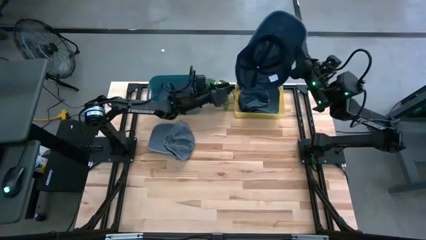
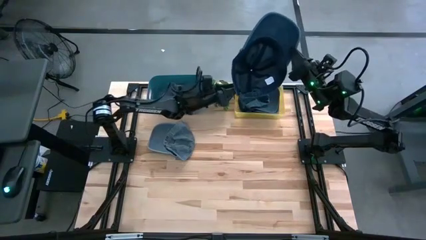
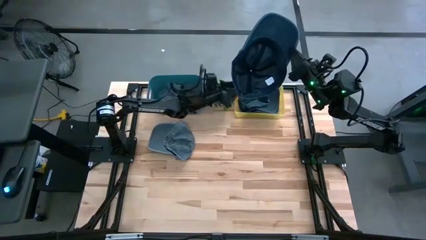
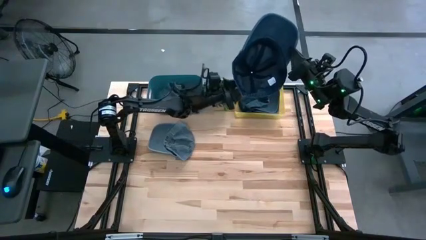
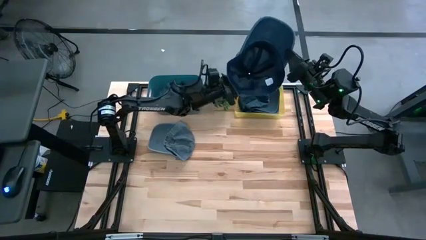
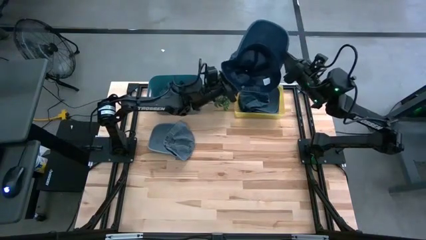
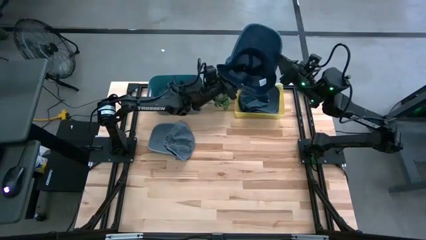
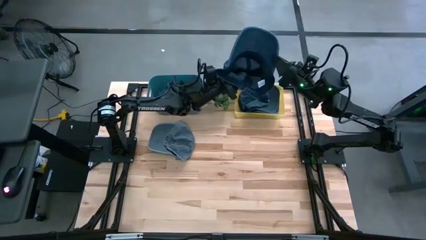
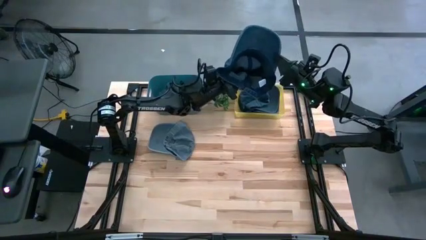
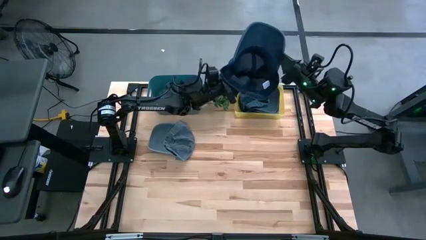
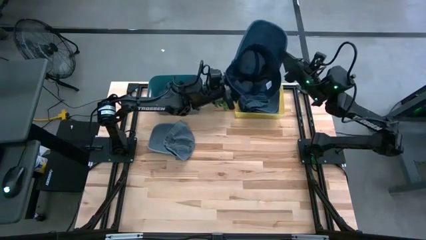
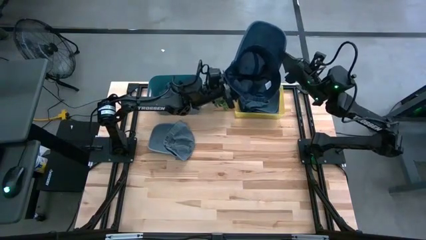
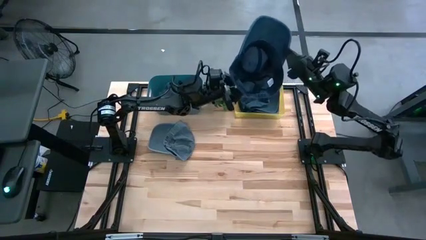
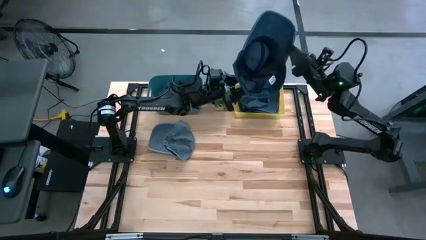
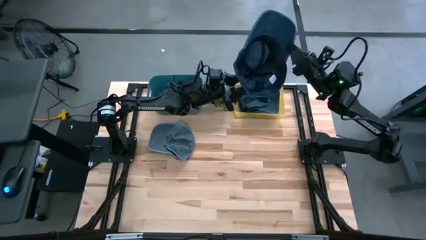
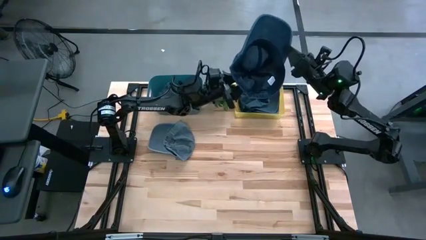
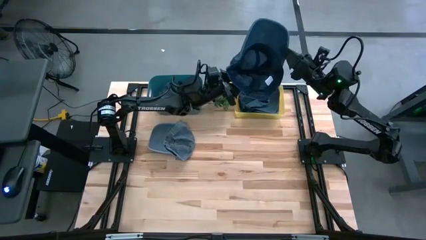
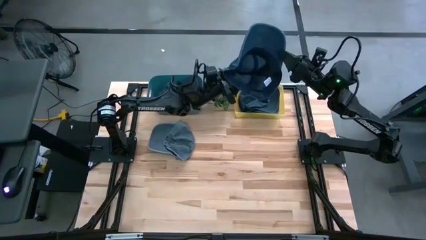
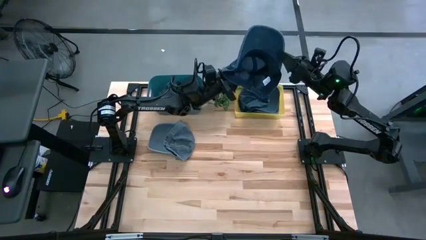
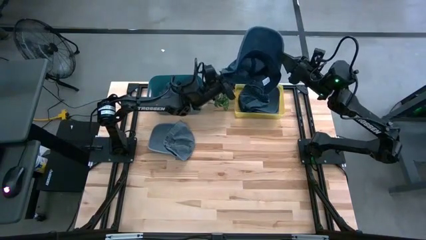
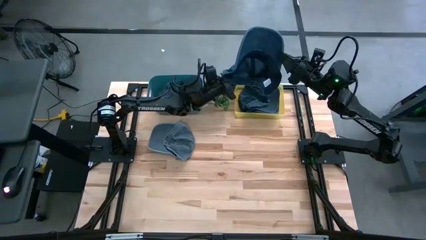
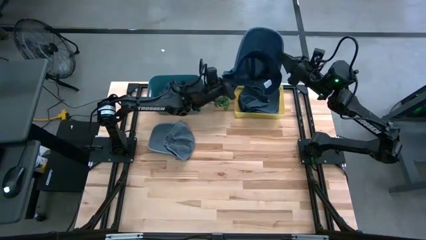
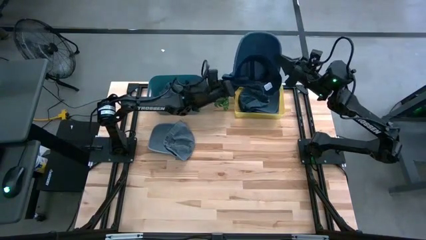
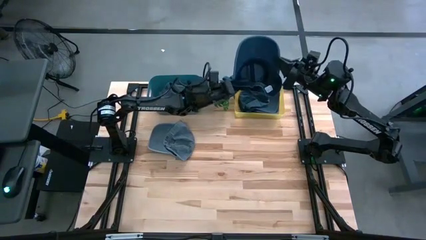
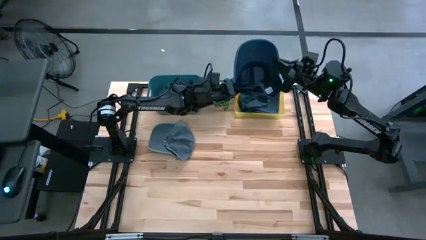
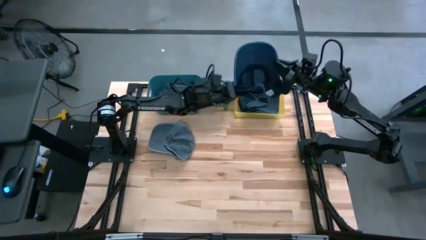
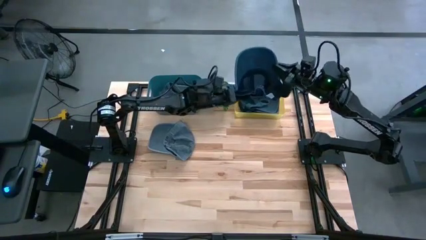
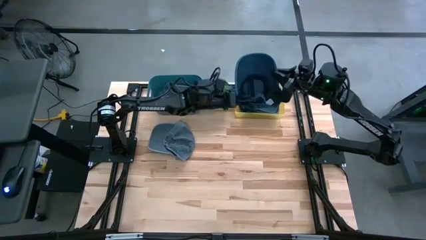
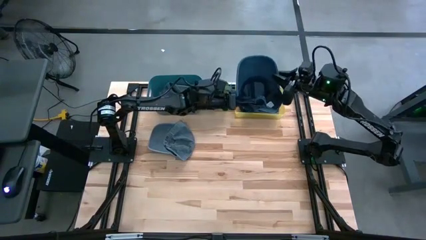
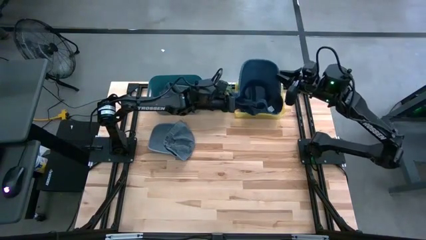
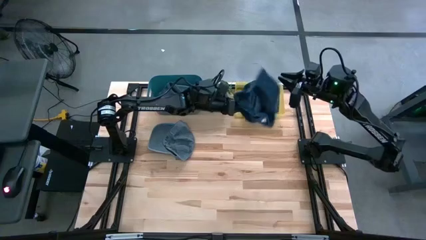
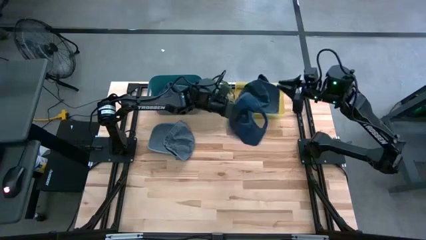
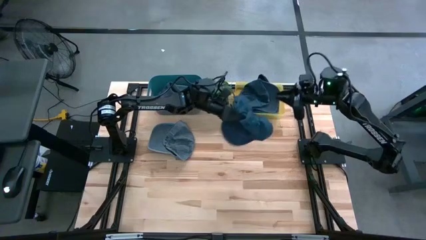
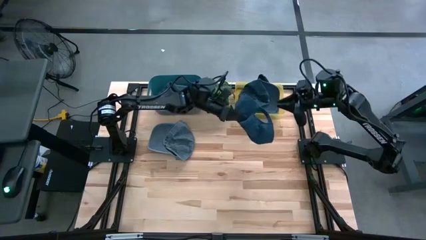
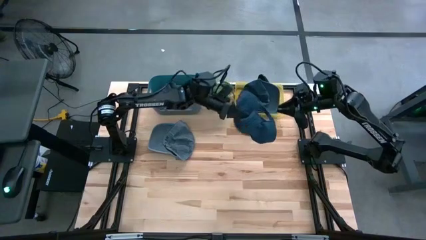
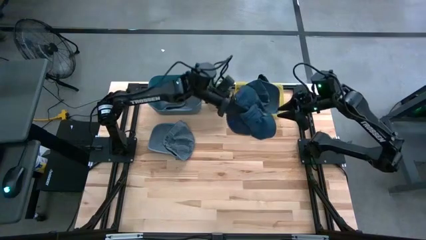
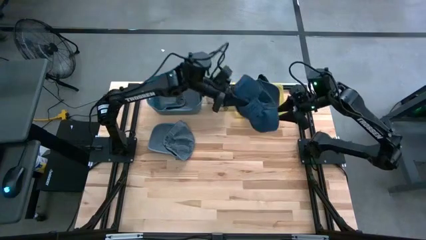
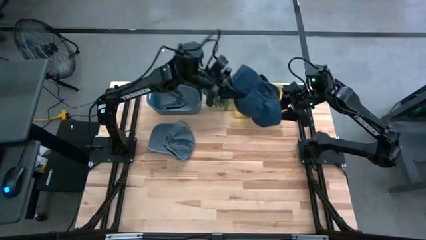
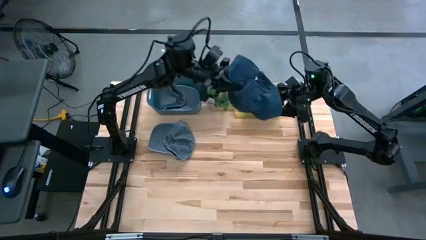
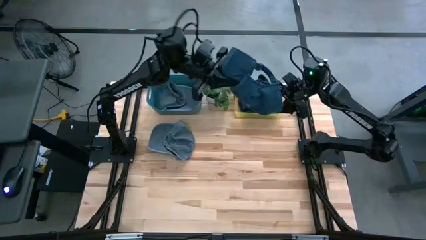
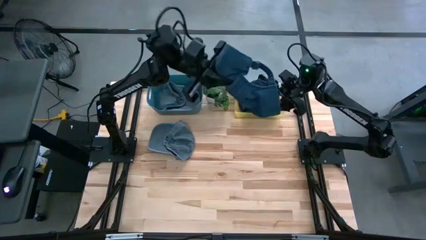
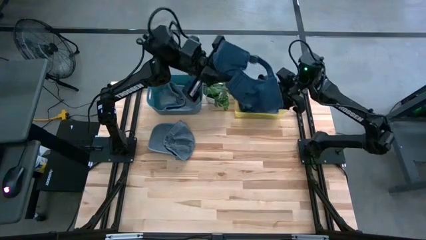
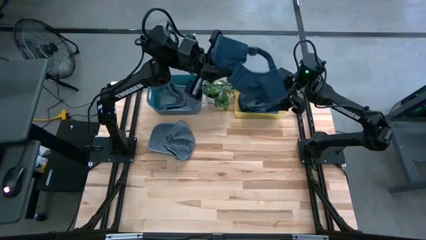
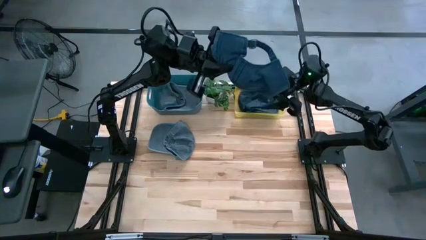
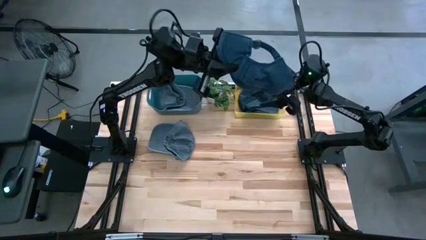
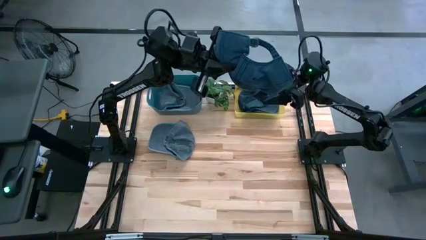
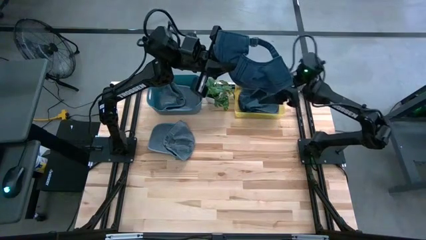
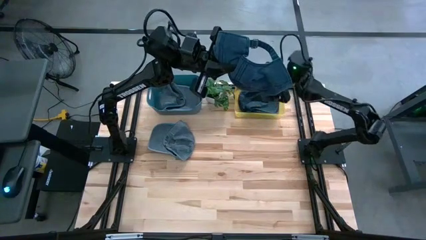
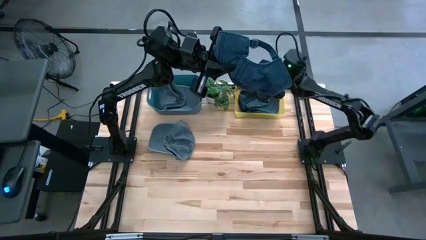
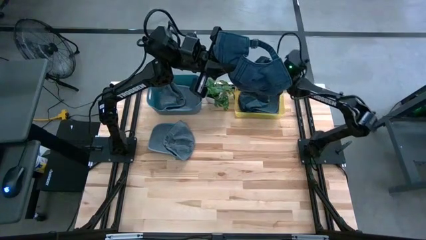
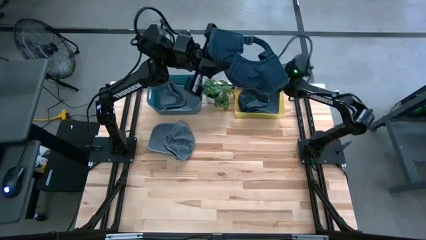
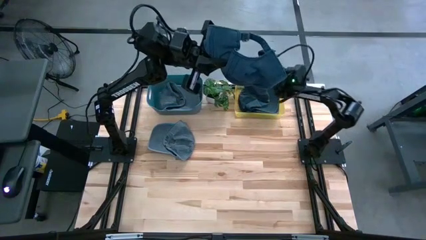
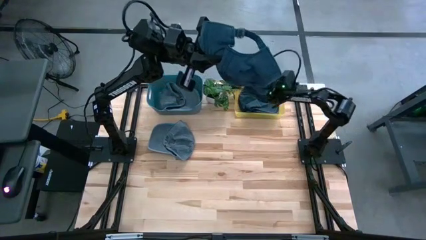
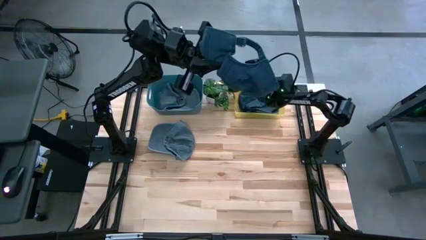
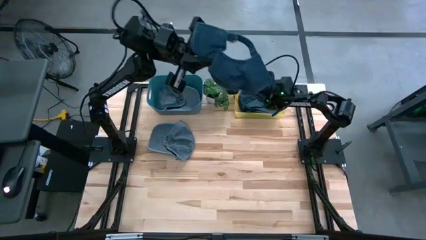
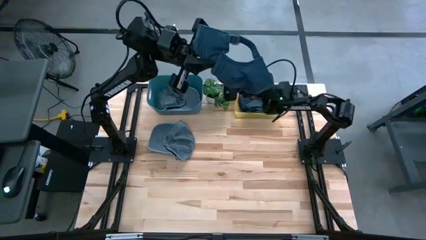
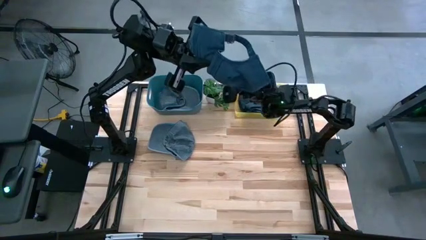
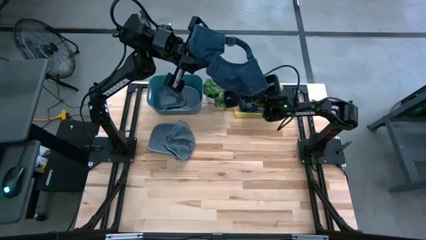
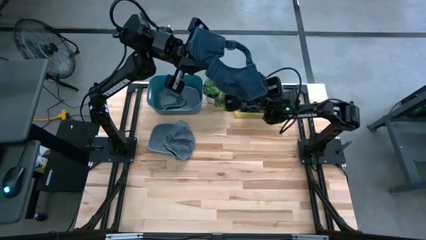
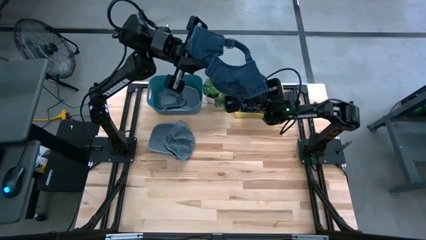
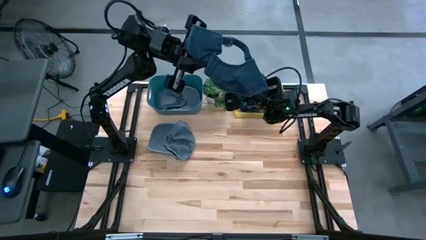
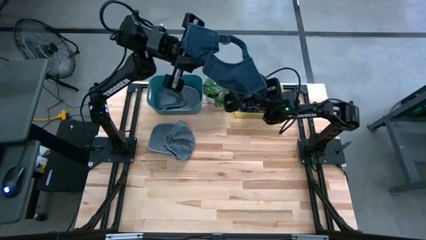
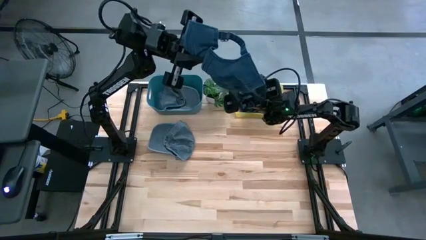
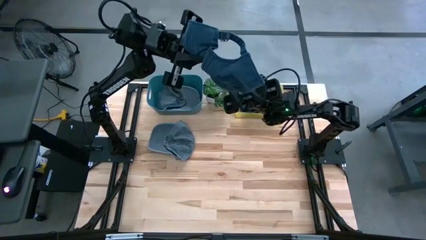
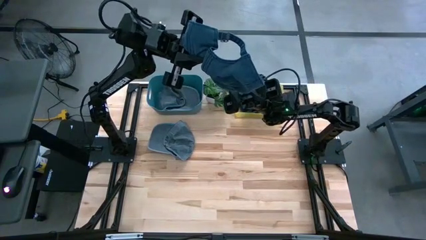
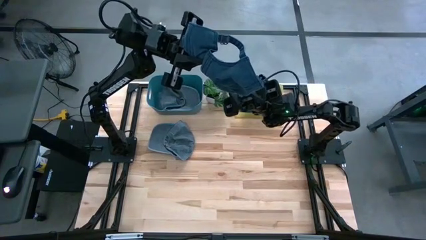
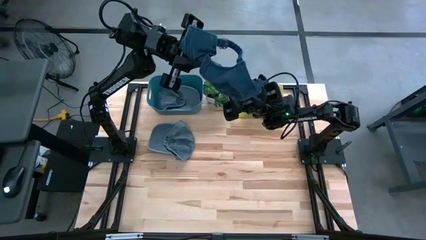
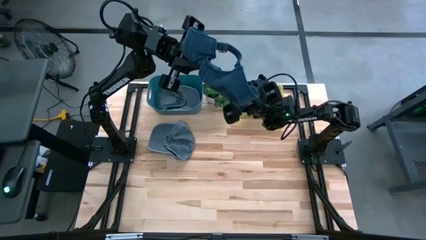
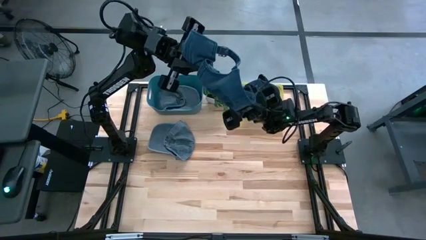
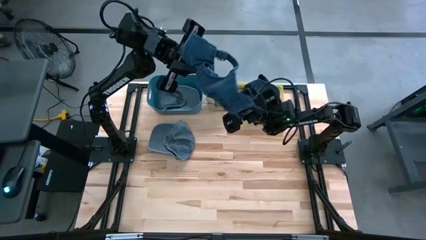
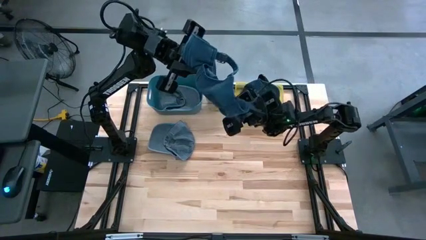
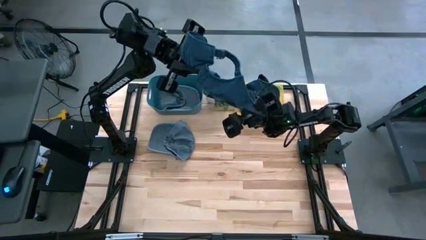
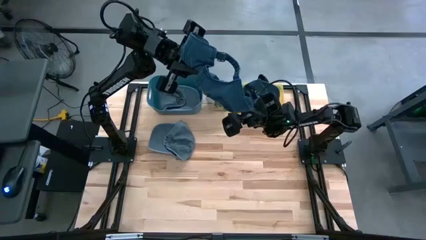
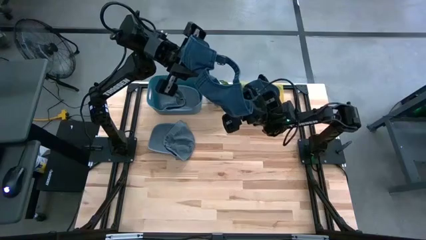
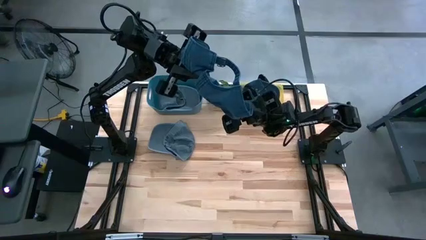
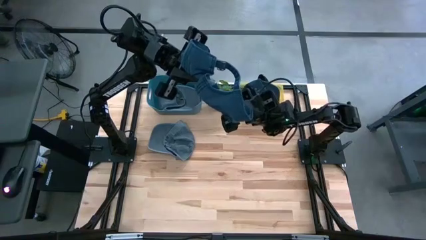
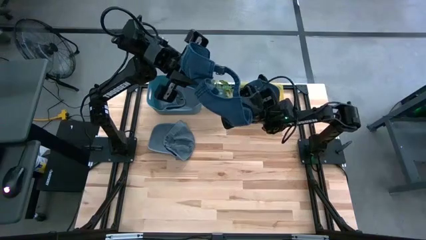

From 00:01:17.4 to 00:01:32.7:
Task: Pick & Place hat
Put the blue cap into the yellow bin

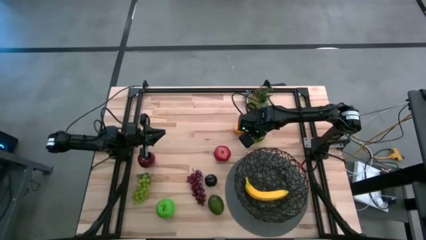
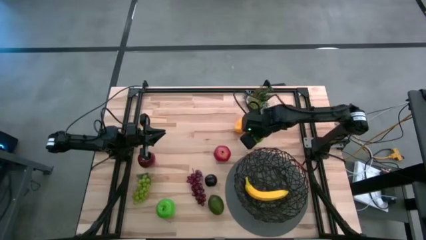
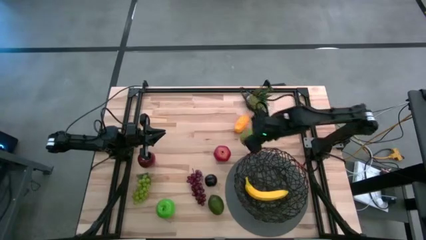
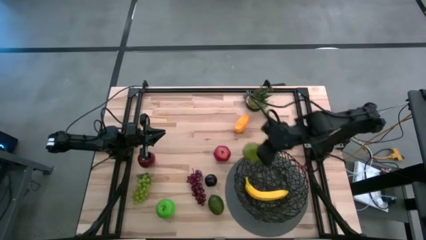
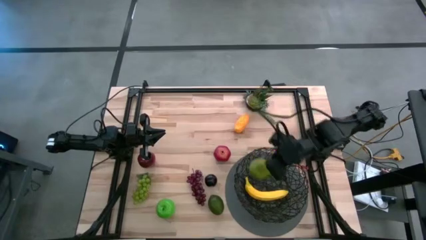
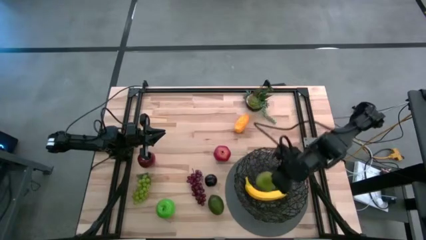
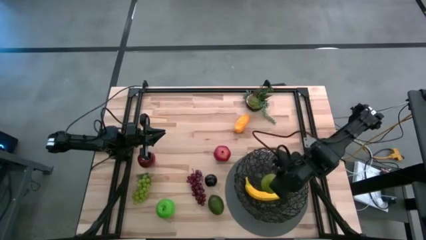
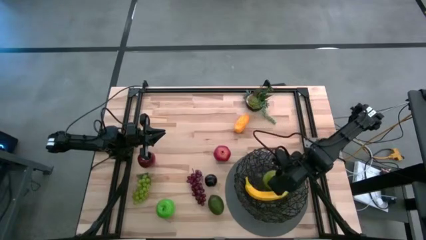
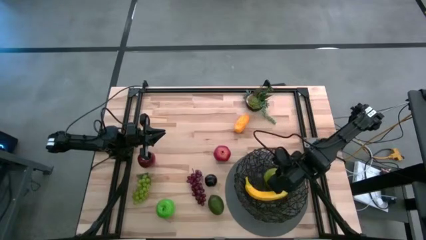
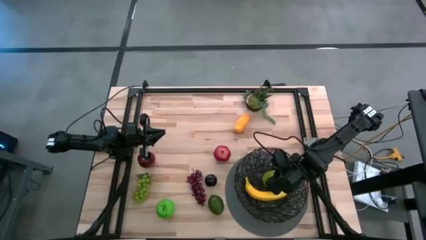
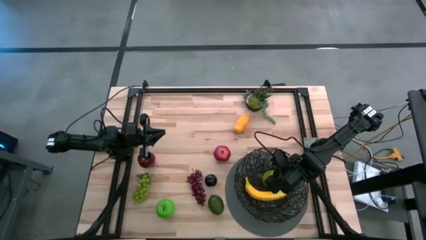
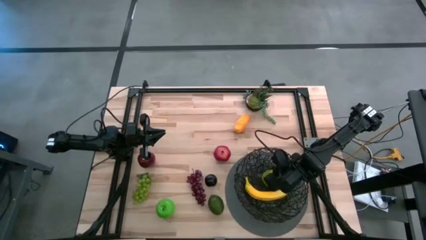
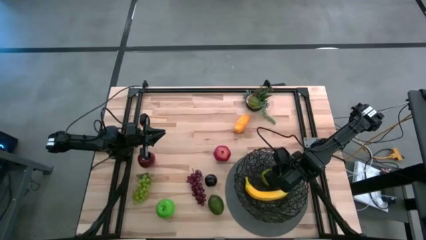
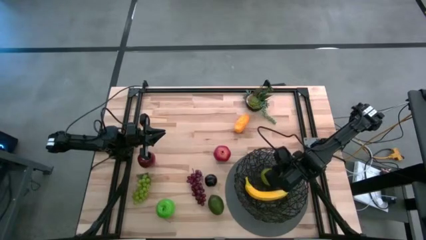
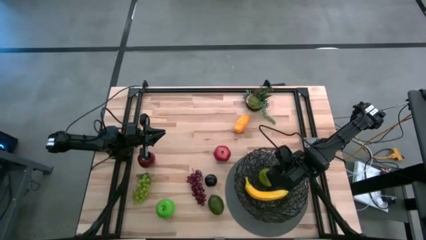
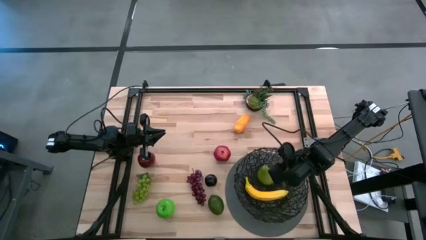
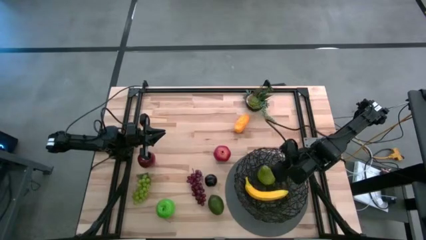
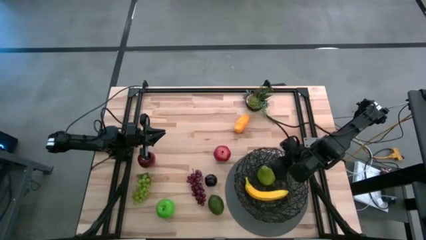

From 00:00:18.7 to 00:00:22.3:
Task: Build produce basket
Put the pear into the black wire basket
